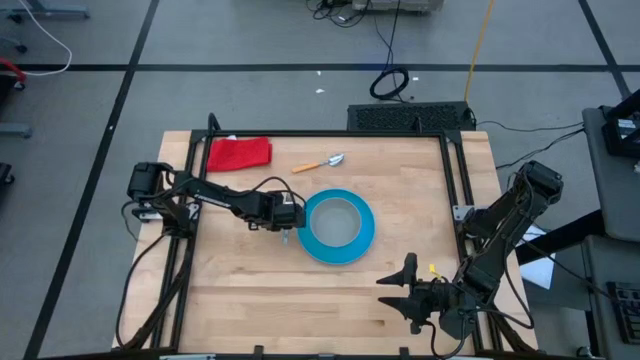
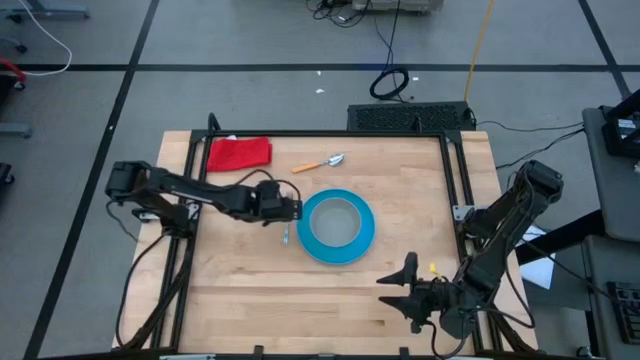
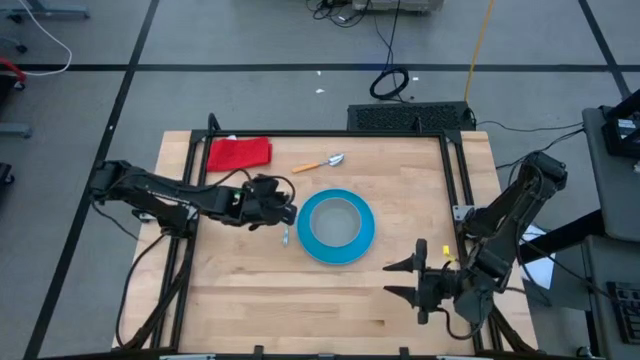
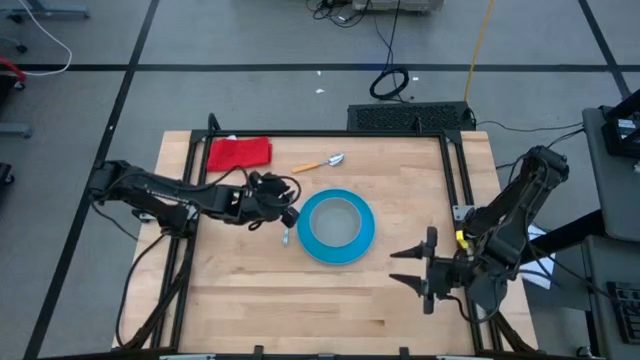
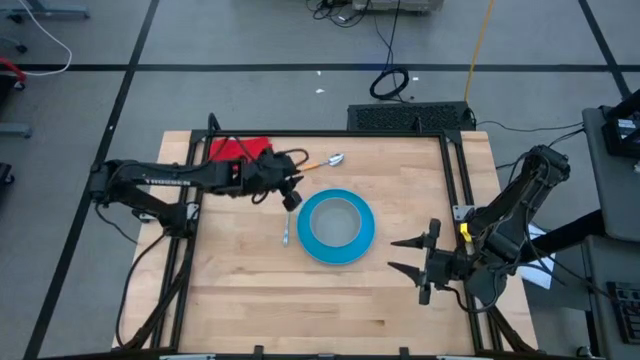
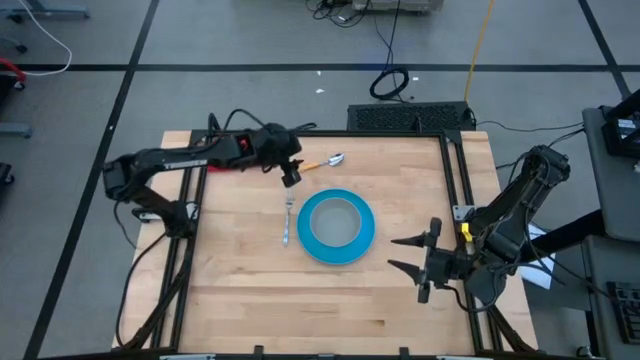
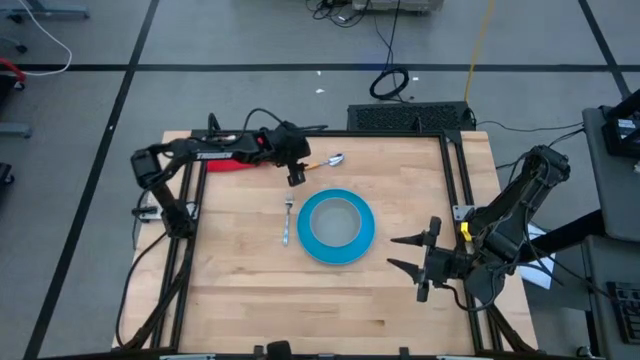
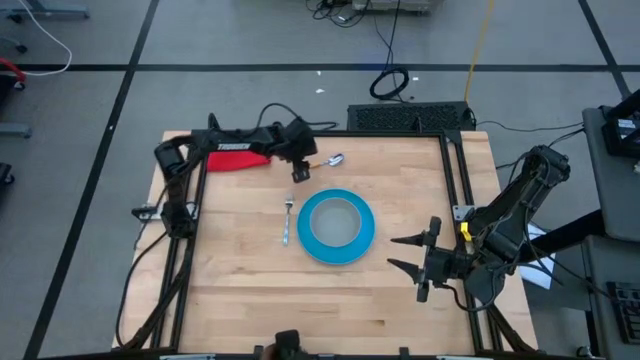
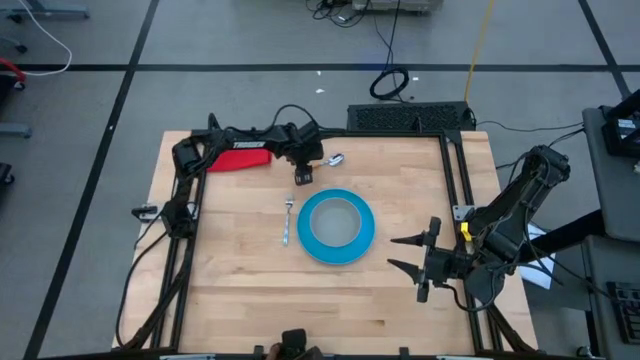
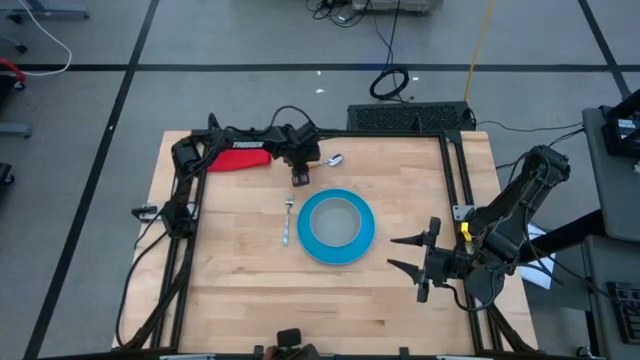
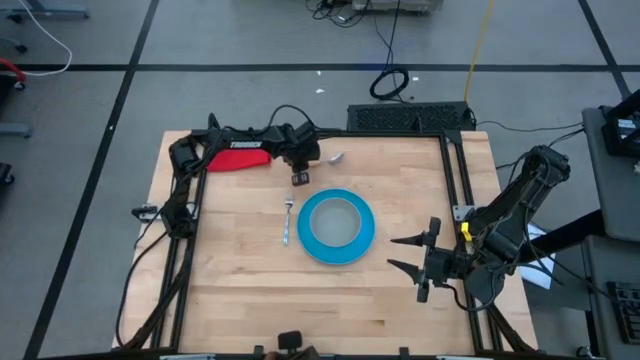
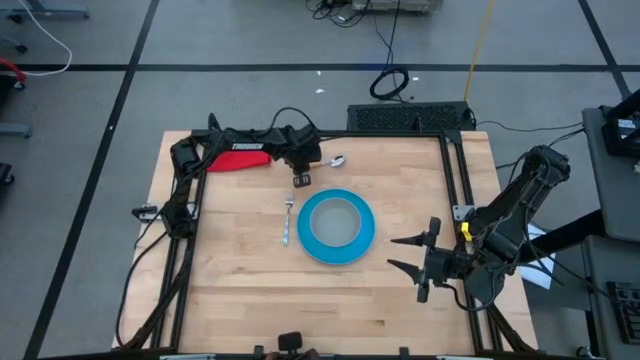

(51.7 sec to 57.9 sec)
Task: Set table place
Put the orange spoon into the gray bowl

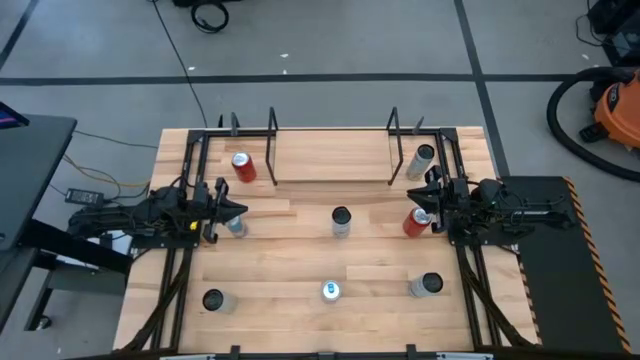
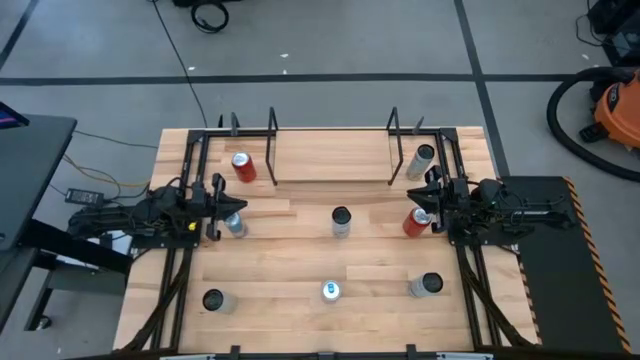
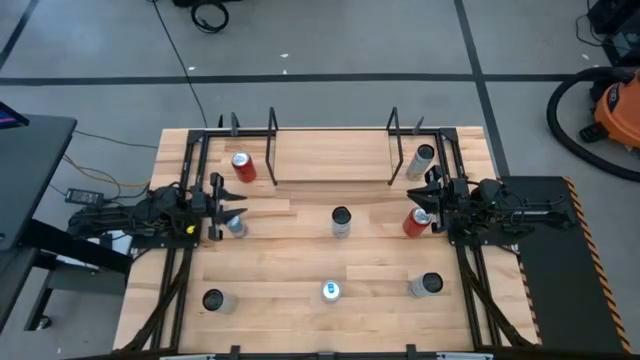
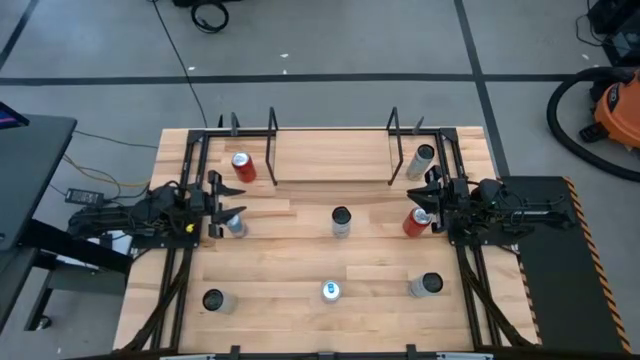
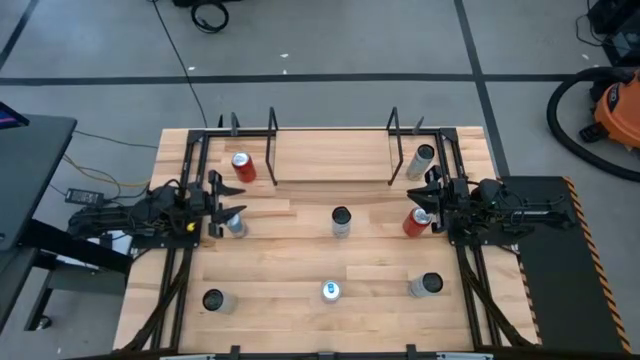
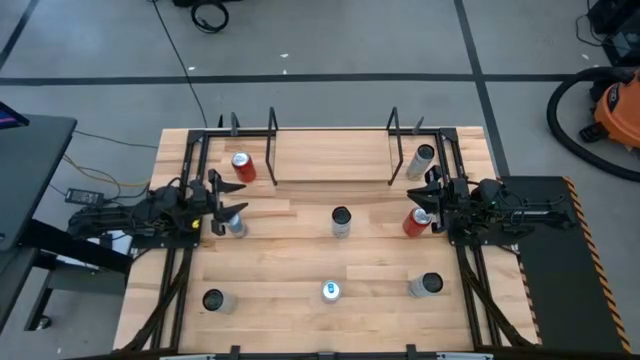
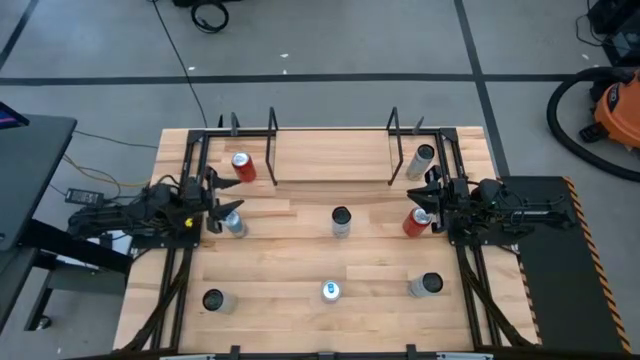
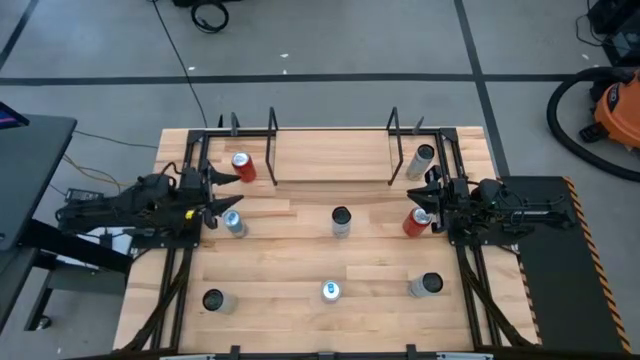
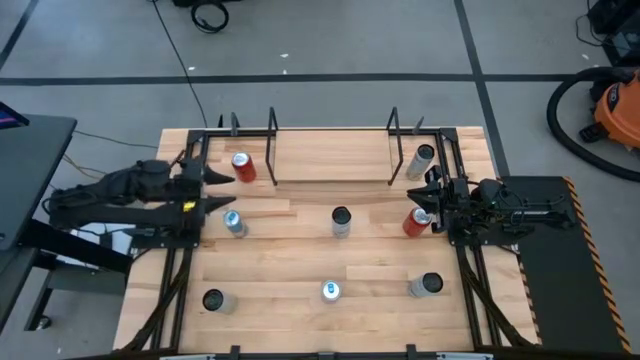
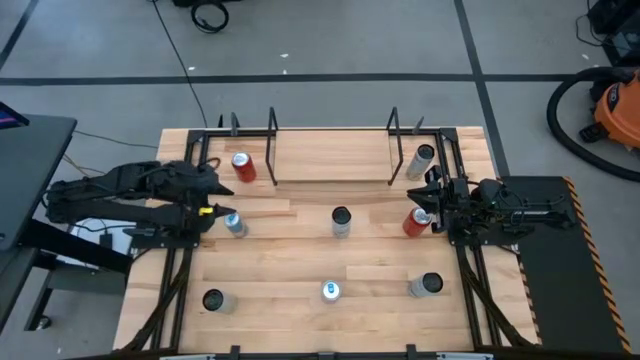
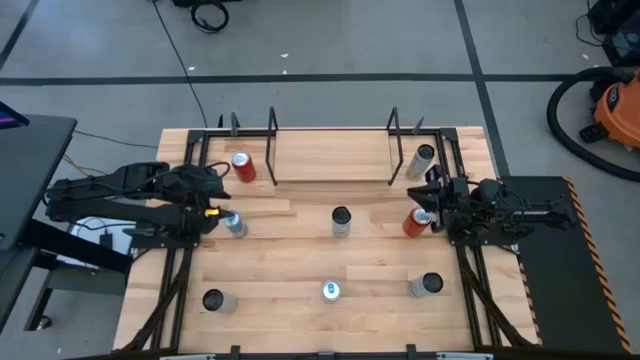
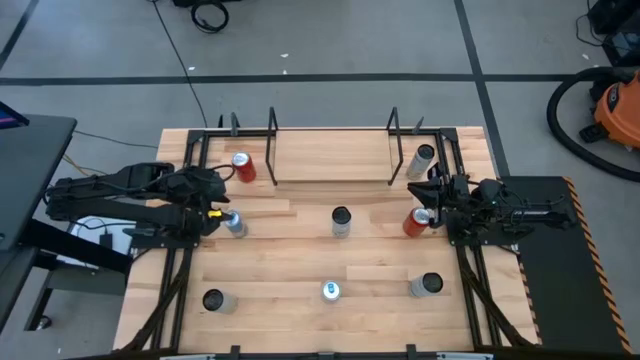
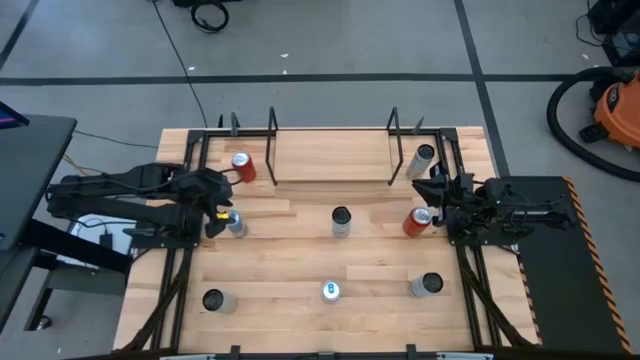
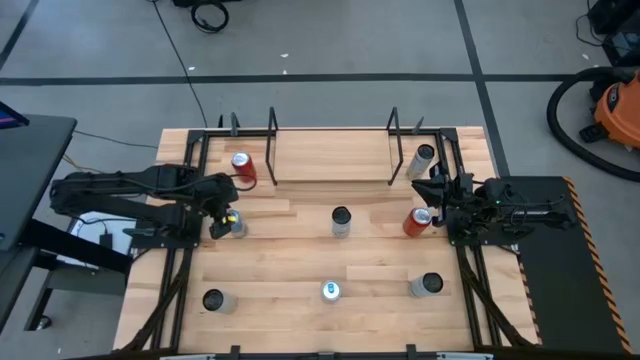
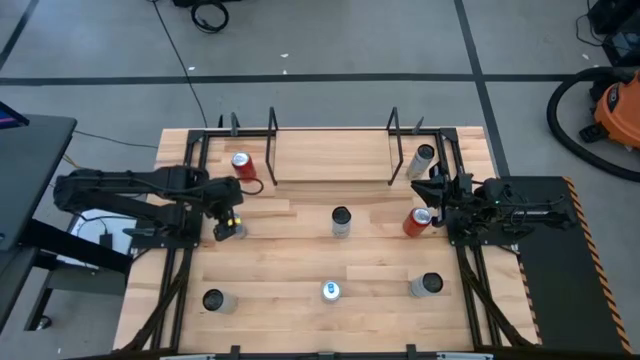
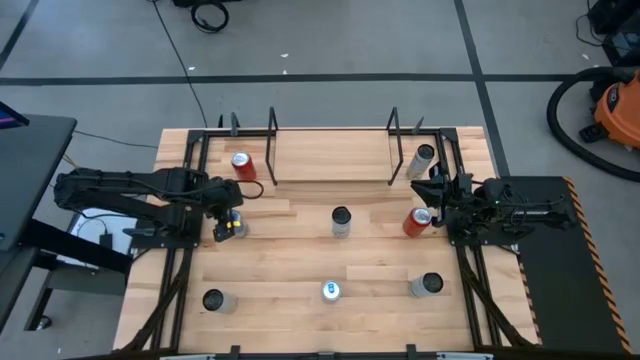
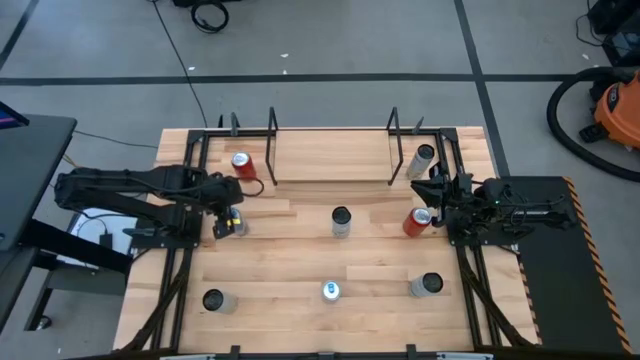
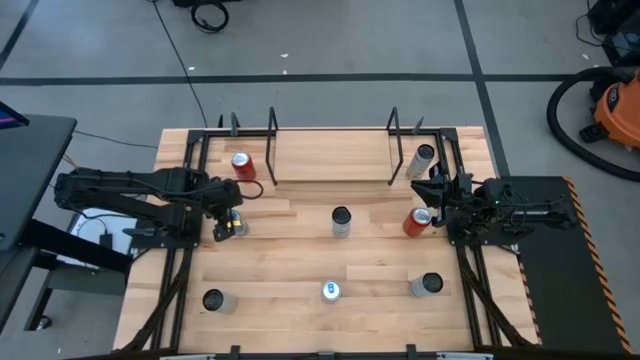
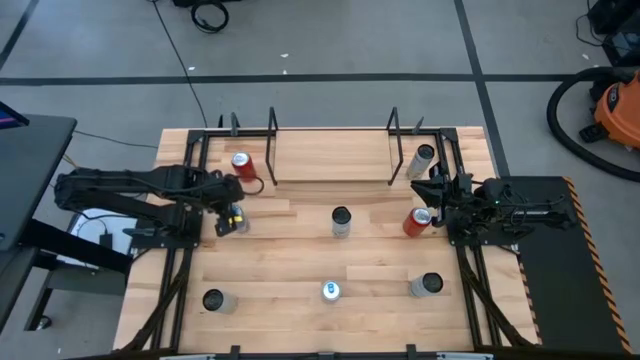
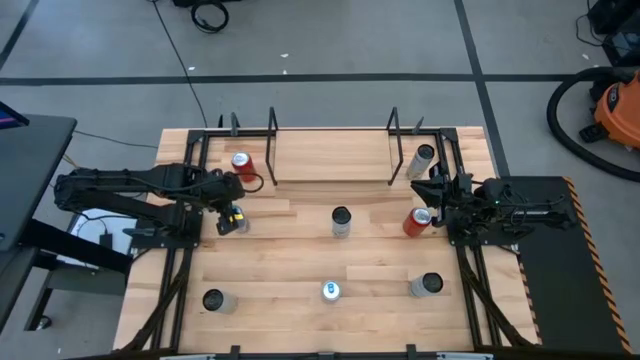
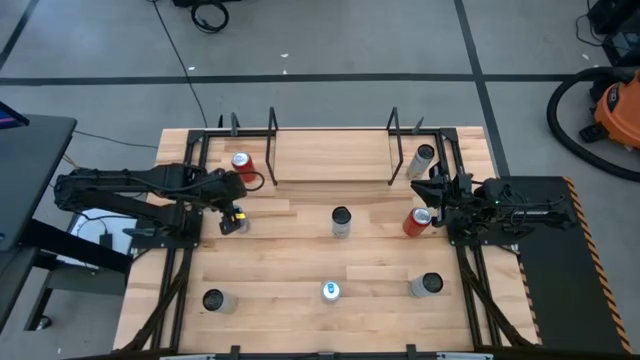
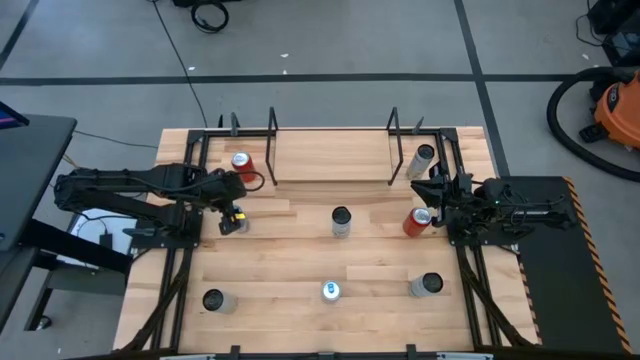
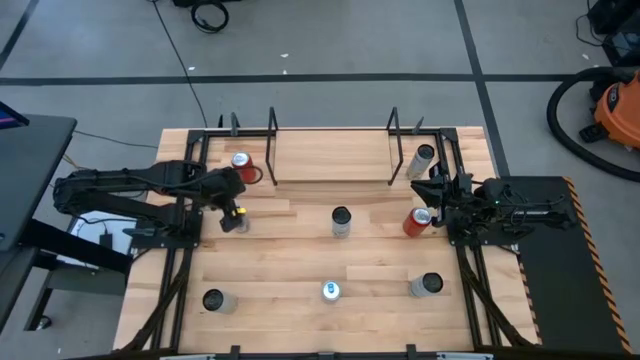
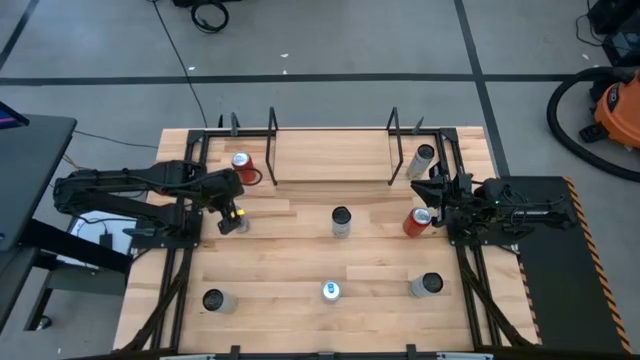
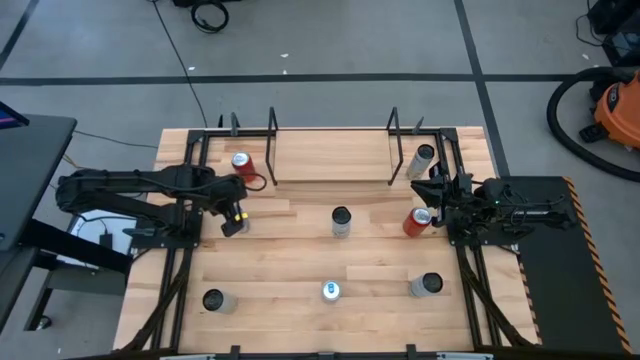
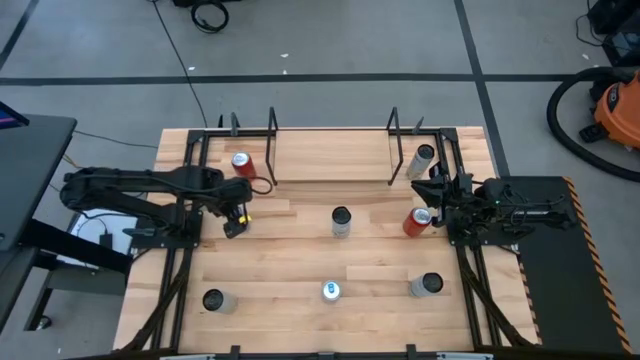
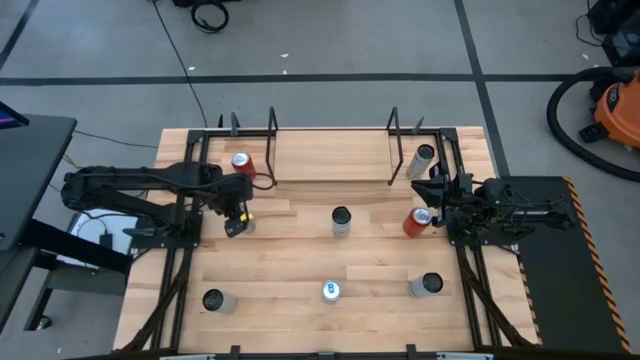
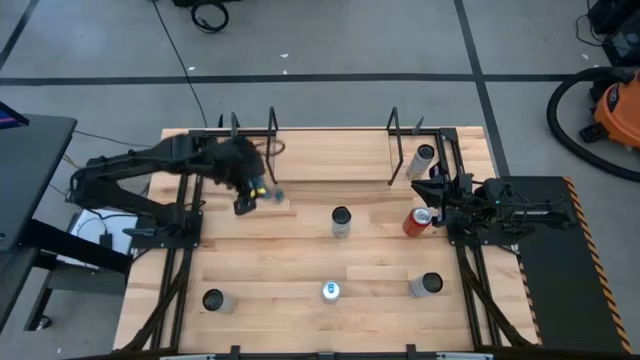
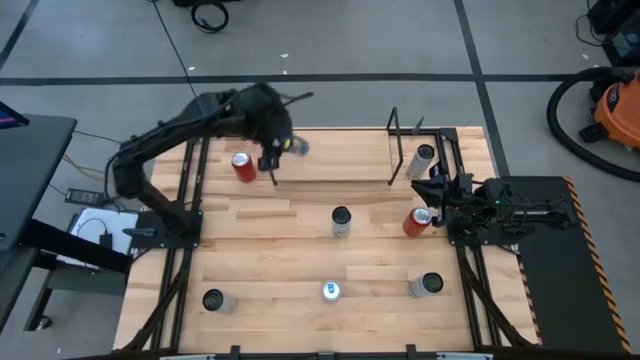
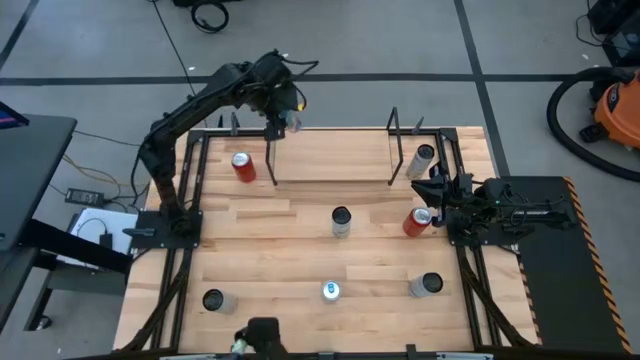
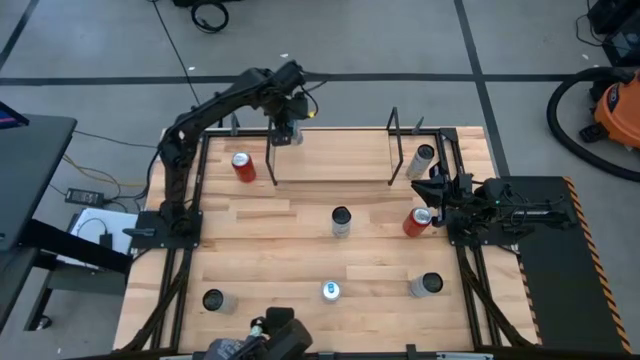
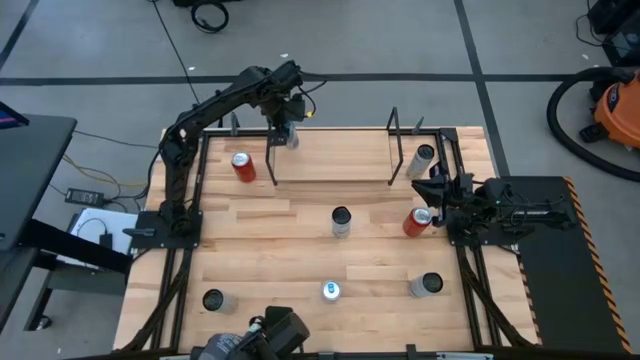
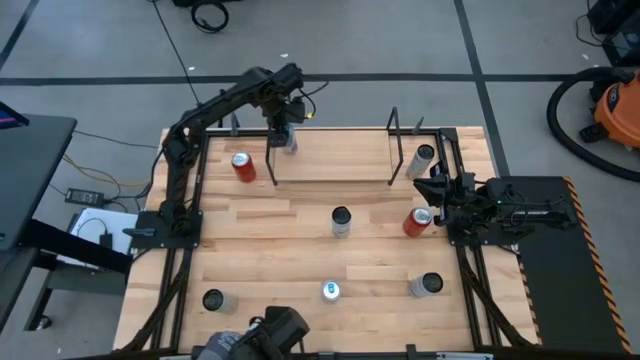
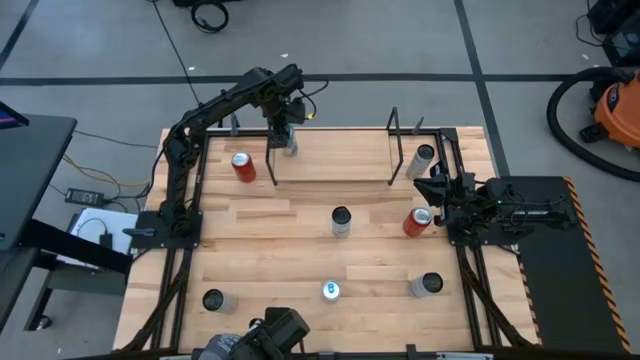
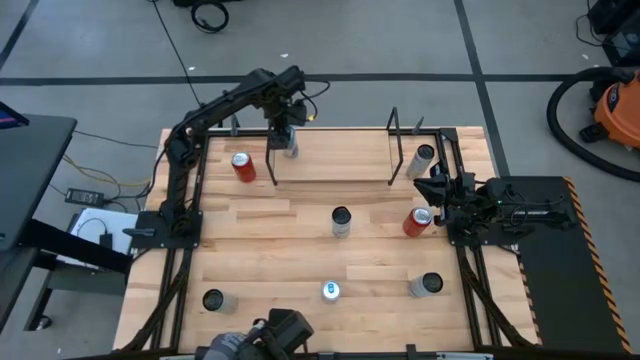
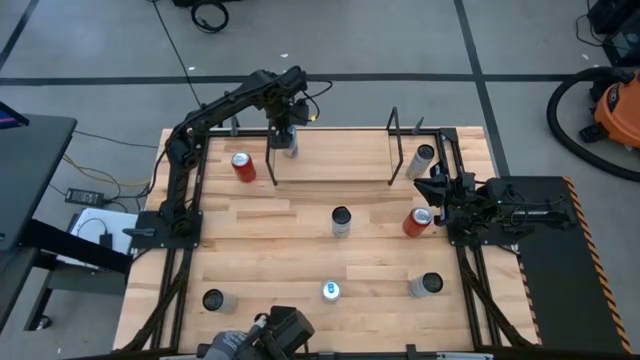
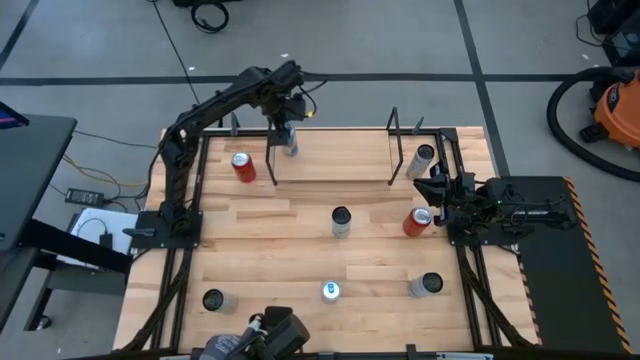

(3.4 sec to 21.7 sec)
Task: Place canned beverage on shelf
Put the top blue soda can on the shelf
